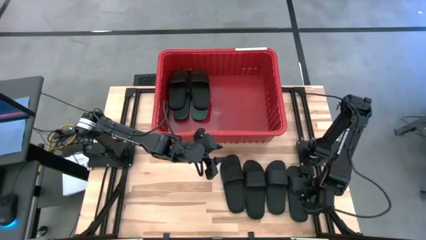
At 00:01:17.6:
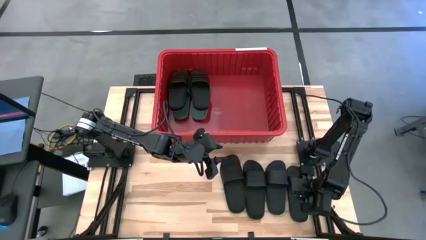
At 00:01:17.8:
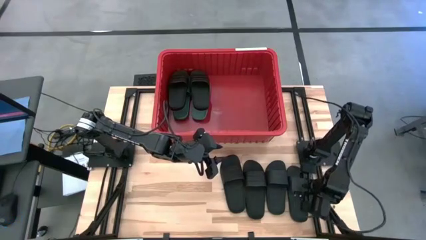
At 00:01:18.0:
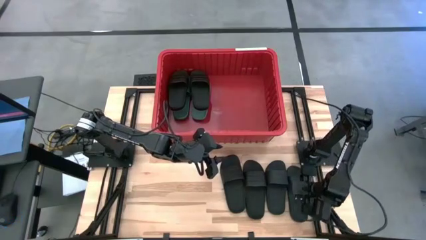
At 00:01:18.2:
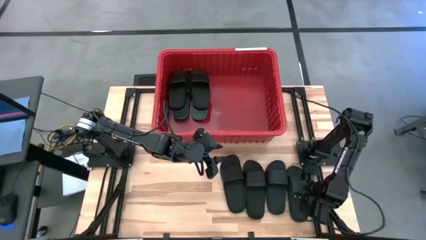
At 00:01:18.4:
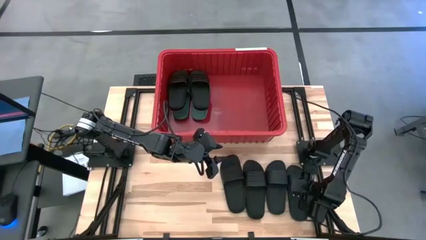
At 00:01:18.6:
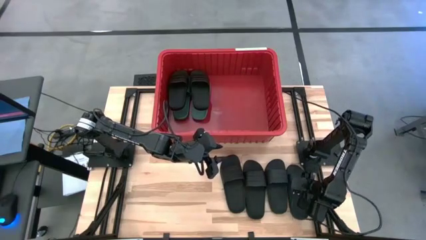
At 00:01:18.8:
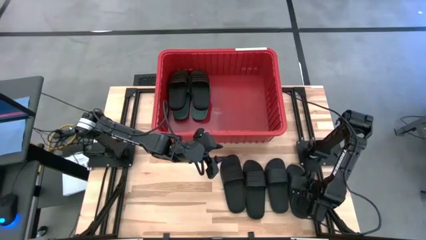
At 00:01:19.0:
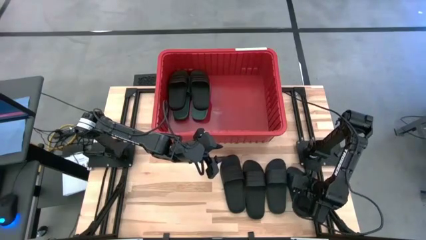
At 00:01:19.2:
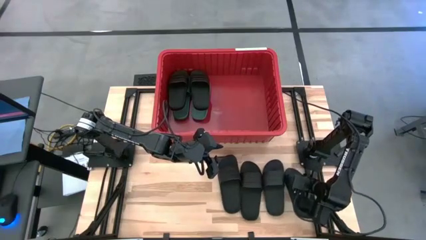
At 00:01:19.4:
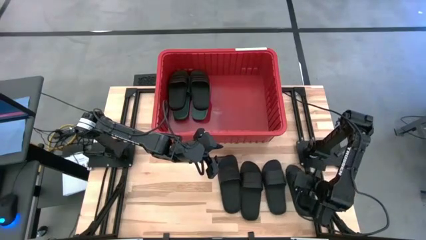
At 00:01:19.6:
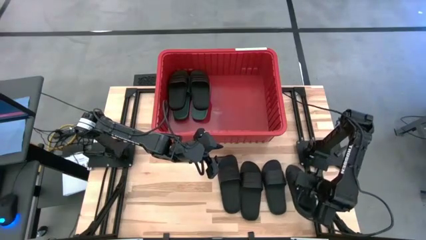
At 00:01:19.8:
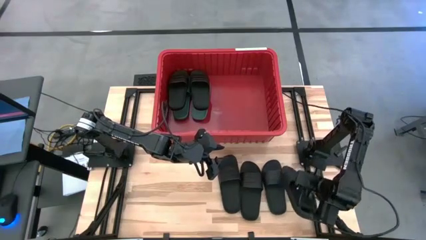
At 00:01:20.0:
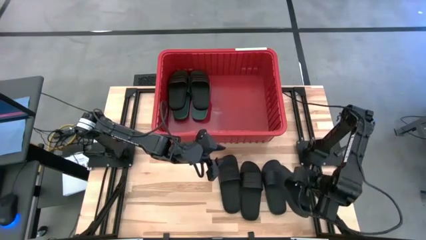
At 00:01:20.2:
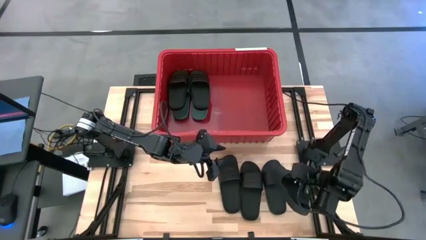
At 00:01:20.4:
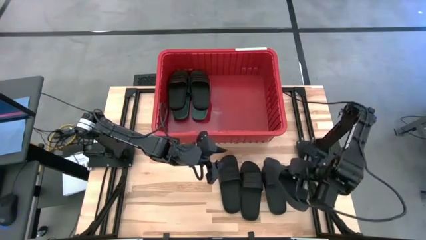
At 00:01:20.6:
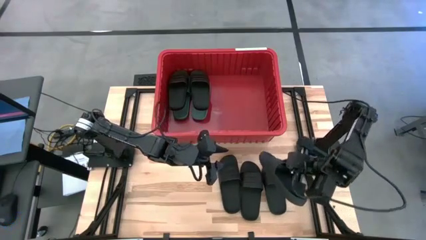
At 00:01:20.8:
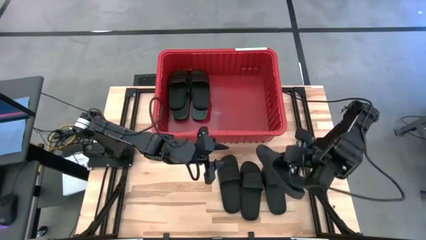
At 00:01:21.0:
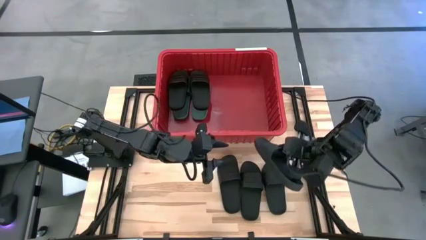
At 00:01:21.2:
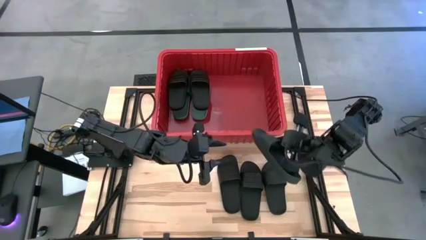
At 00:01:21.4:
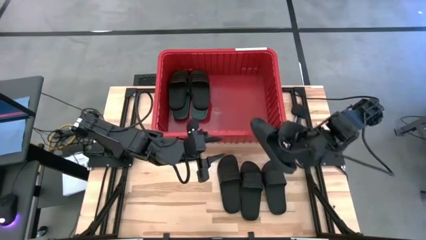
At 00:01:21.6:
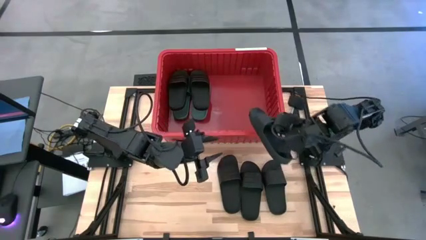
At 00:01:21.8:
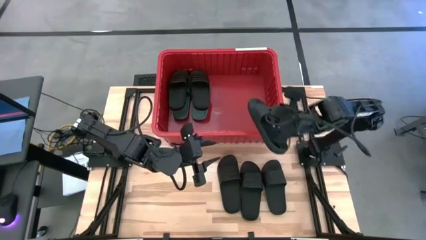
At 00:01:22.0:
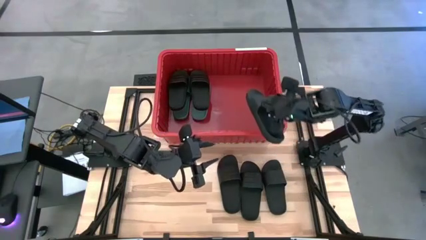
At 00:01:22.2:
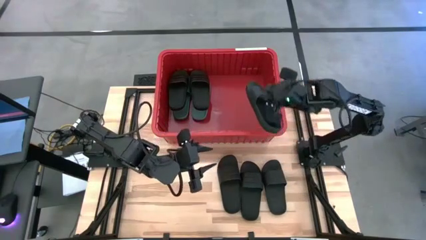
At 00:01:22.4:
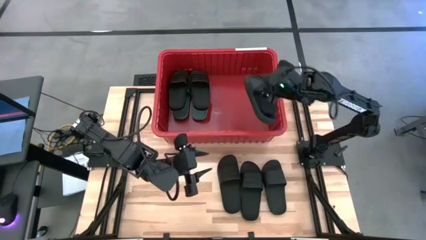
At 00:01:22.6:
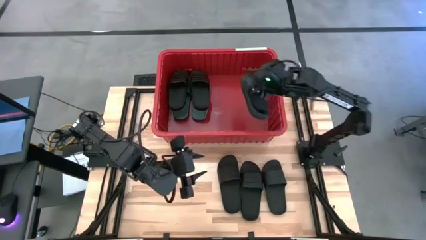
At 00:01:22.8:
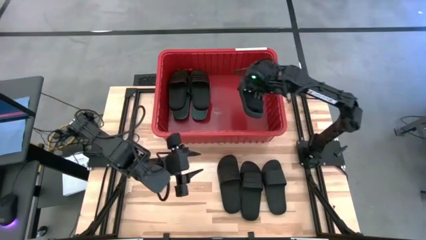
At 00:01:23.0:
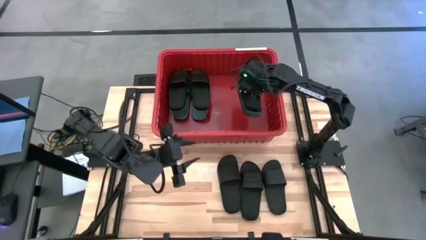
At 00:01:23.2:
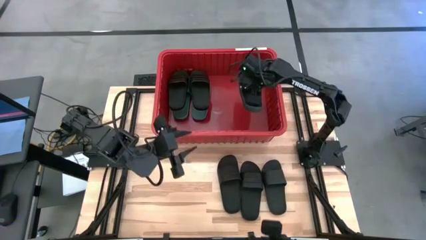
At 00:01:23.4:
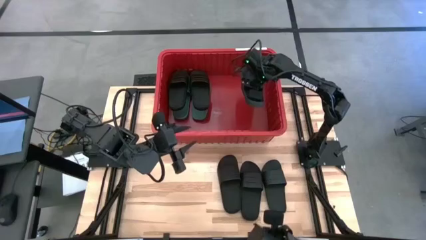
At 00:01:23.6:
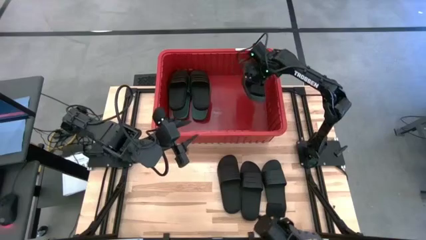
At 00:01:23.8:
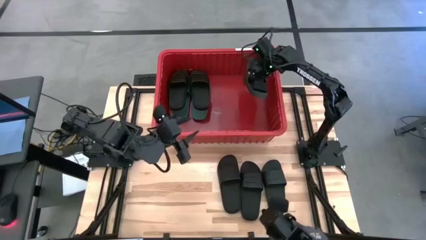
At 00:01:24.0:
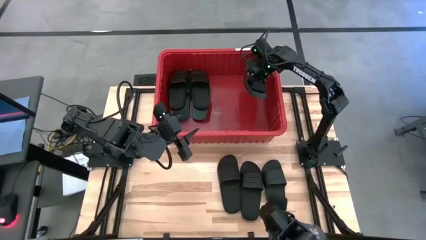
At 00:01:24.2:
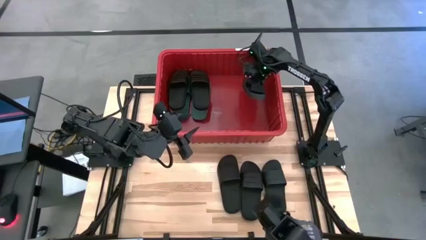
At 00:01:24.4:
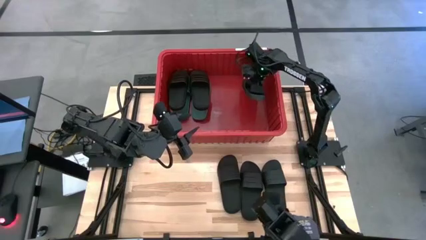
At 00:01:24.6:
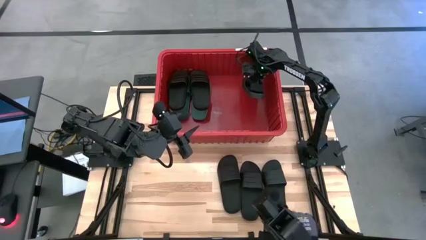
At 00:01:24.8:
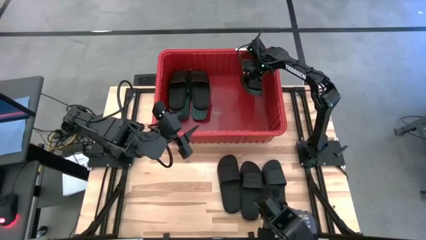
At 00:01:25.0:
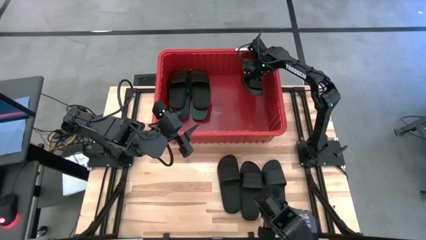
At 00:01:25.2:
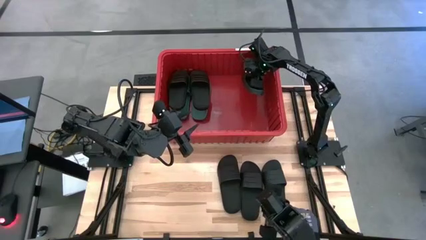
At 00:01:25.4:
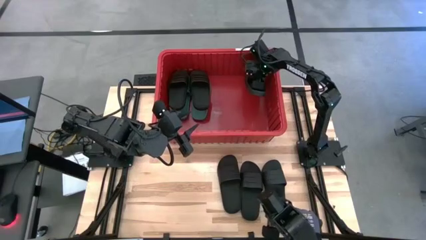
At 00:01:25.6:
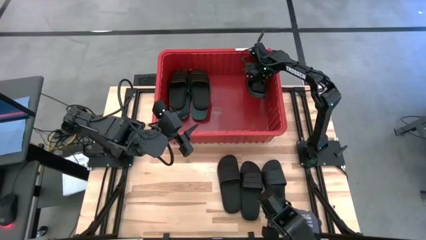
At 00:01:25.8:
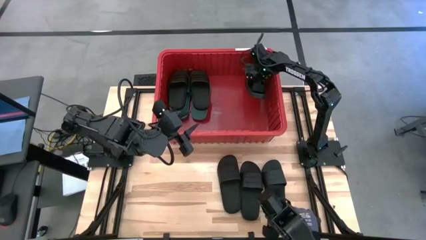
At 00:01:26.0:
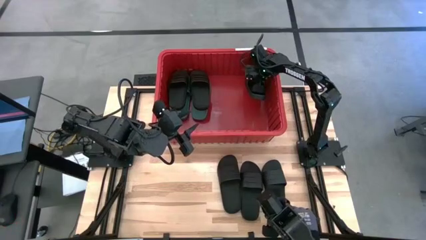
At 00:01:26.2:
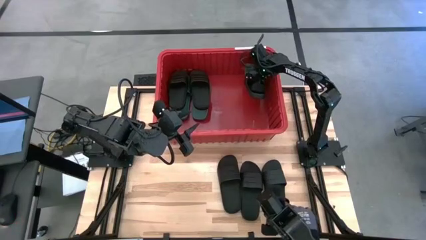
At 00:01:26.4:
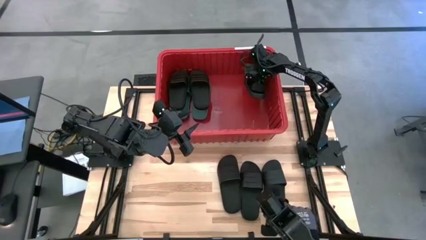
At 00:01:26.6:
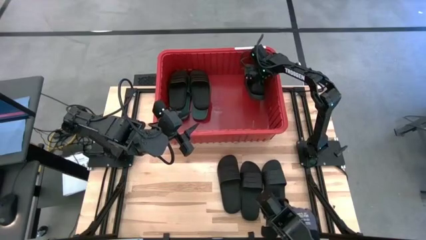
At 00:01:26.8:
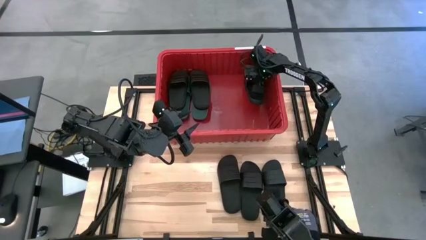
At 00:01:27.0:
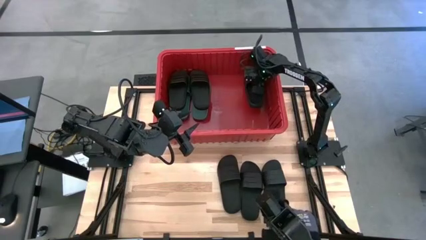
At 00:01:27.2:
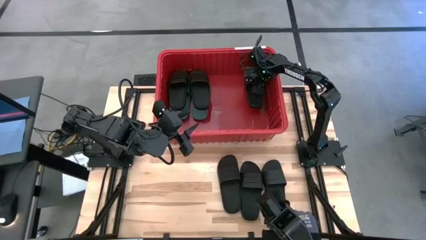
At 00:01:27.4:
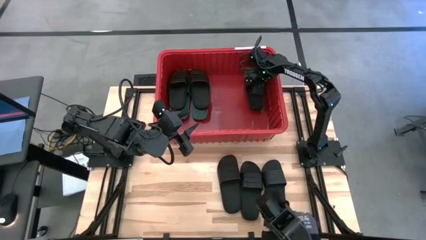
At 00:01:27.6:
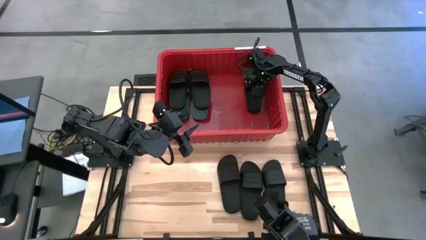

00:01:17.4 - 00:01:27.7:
Task: Pick and place slides into bin
Put the black slide into the red bin

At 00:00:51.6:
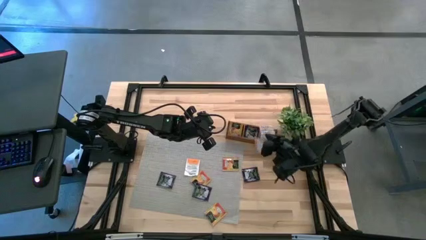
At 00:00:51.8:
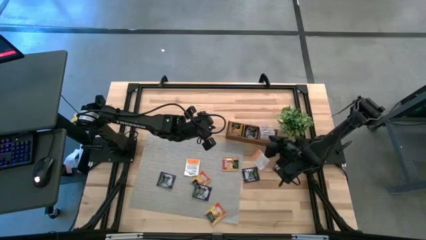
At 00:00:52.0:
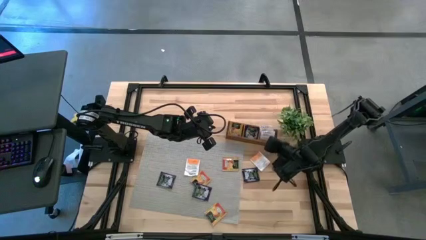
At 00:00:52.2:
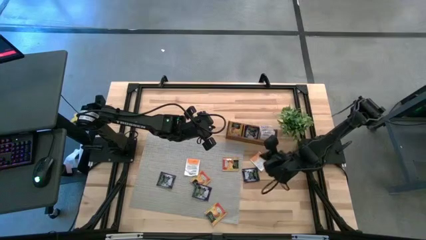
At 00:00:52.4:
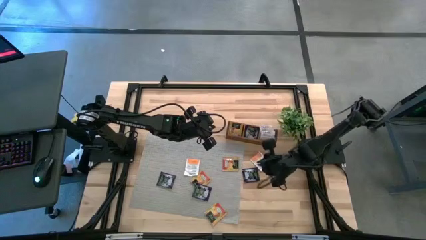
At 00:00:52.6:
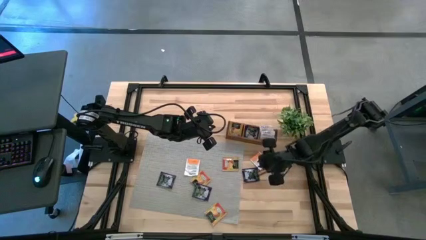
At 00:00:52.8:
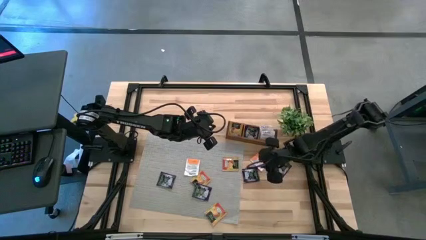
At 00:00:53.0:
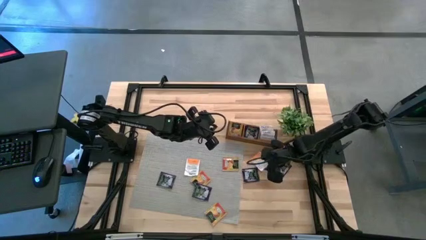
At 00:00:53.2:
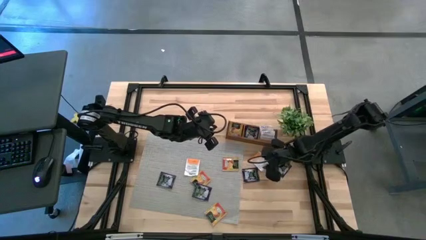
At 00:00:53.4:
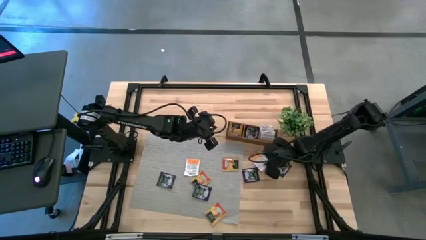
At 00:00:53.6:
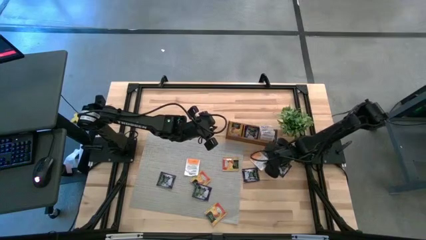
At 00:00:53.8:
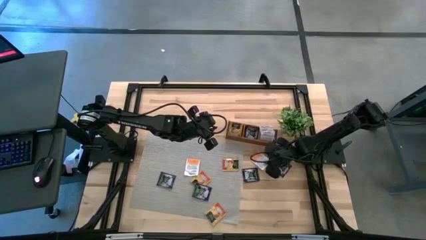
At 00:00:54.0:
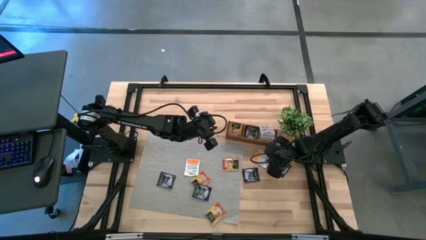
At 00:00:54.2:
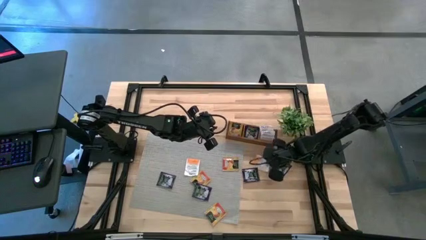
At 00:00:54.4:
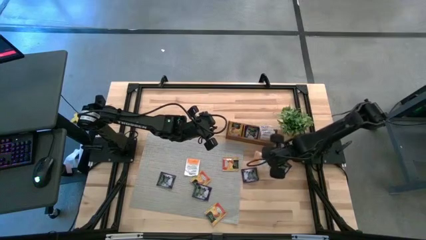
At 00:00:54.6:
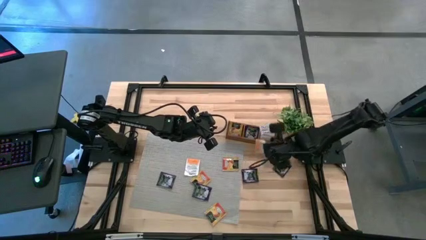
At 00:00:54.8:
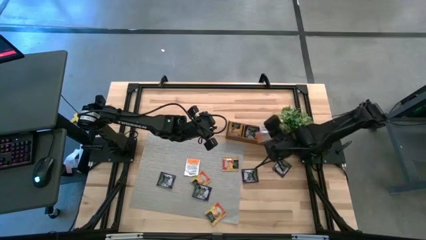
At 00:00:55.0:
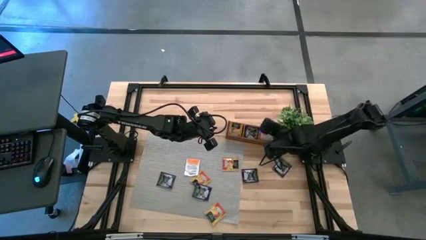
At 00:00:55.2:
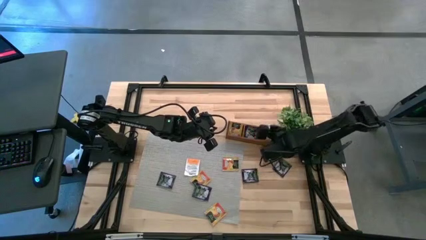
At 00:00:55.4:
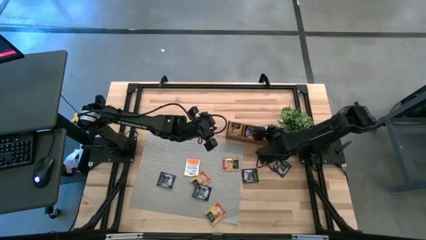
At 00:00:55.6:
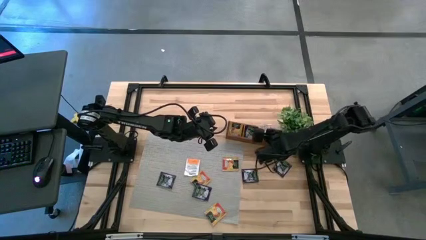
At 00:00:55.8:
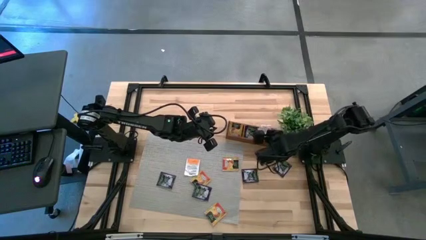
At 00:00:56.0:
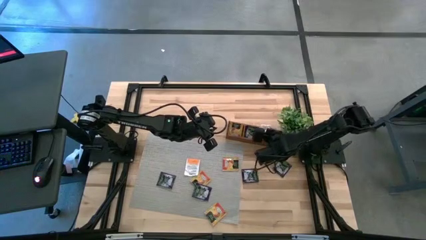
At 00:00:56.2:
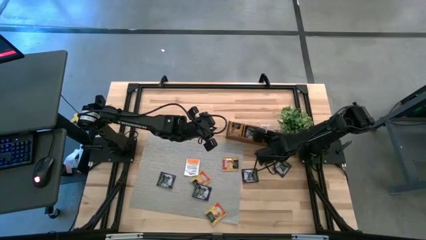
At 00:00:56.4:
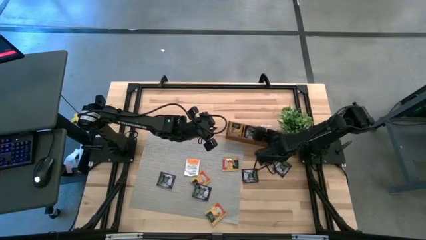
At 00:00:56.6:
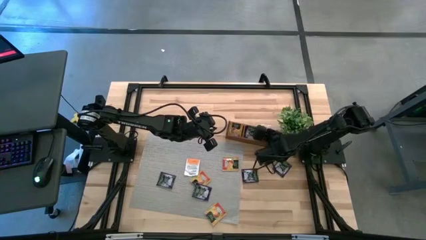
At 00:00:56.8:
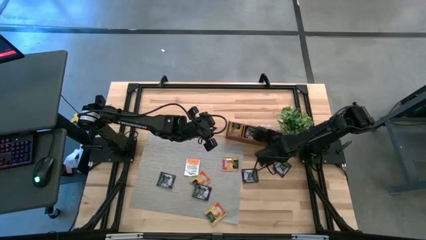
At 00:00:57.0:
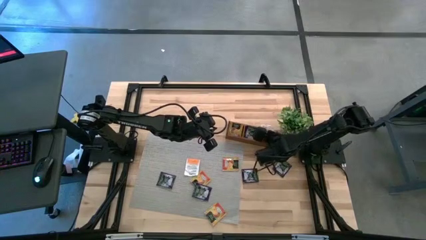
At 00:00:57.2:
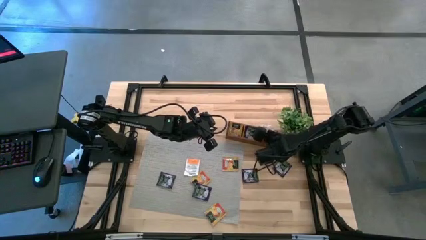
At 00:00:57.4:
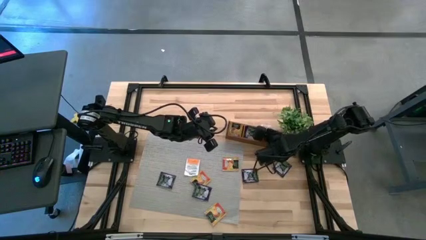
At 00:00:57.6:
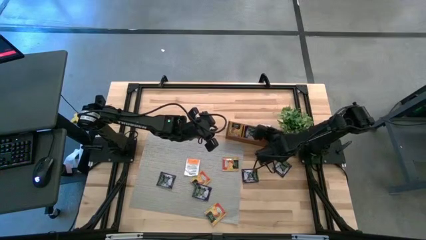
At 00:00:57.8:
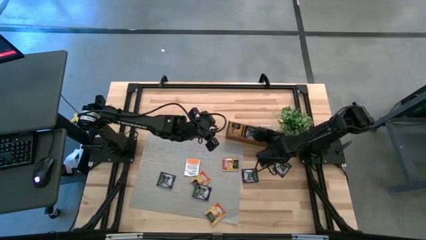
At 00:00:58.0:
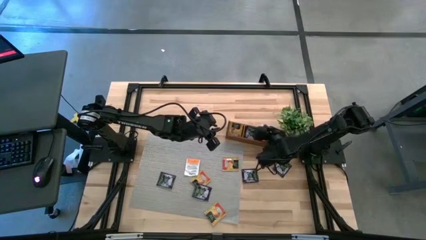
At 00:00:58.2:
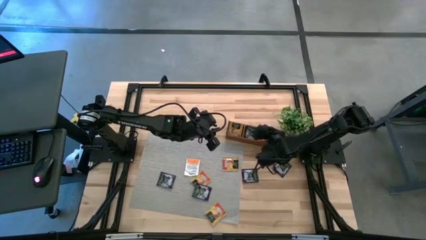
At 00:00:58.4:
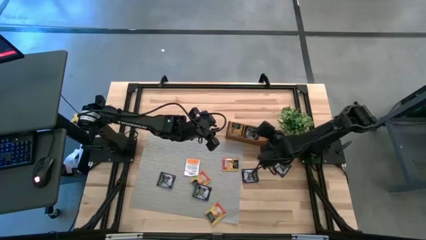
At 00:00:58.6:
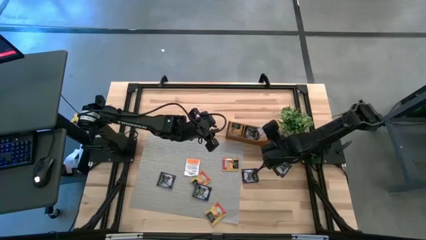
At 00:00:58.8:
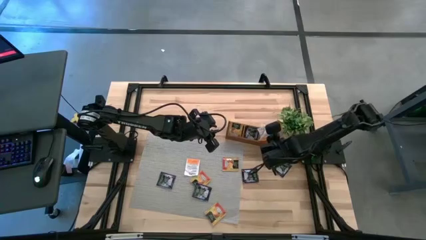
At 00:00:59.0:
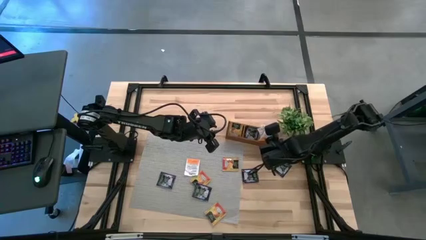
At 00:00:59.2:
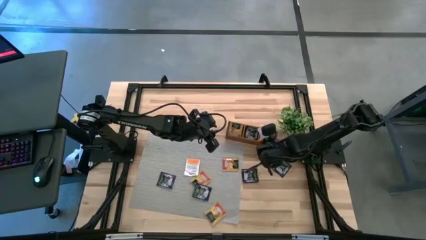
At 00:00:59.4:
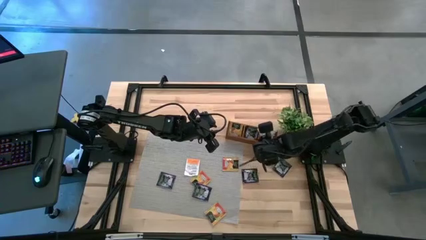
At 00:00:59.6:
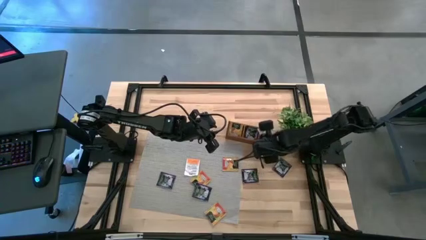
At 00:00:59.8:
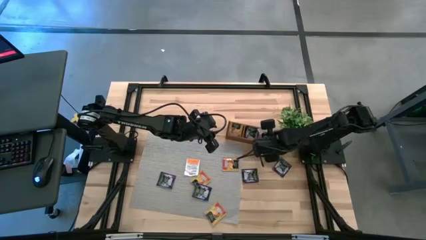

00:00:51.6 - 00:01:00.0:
Task: Pick & Place Tea
Put the white orange tea bag in the right section of the wooden organizer
